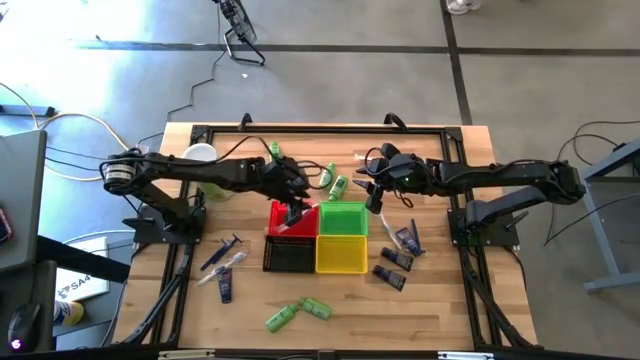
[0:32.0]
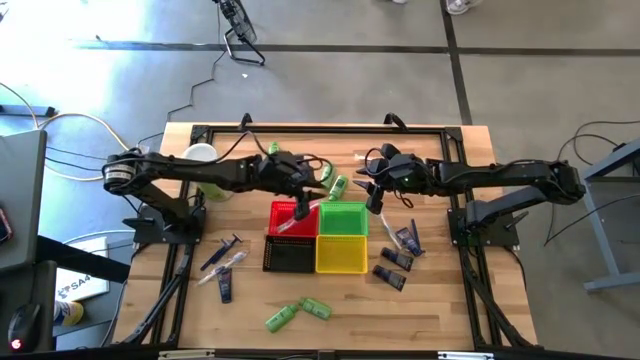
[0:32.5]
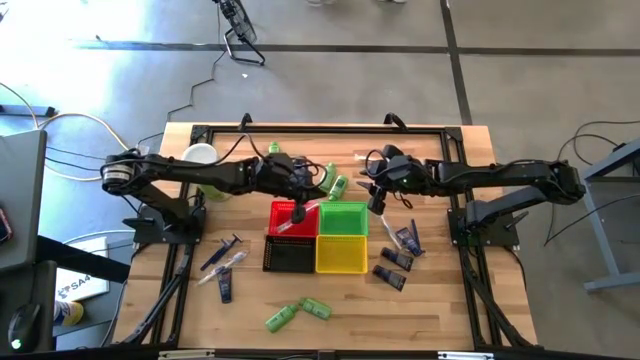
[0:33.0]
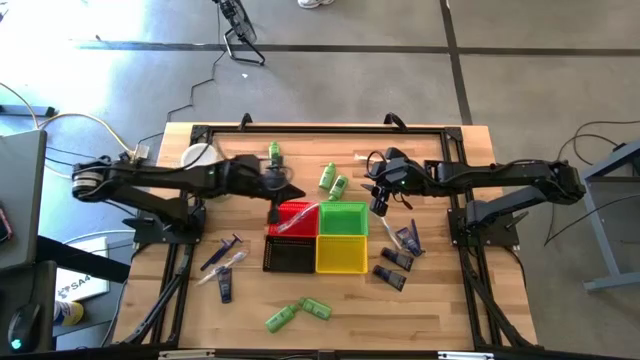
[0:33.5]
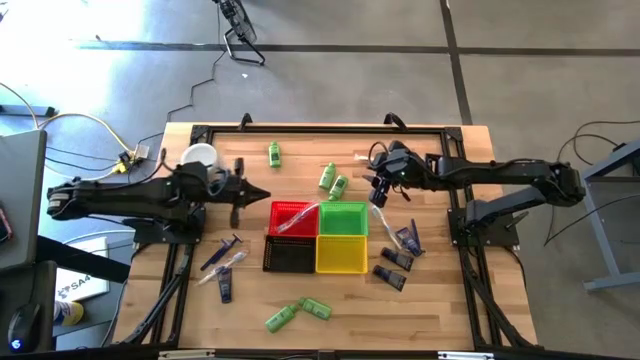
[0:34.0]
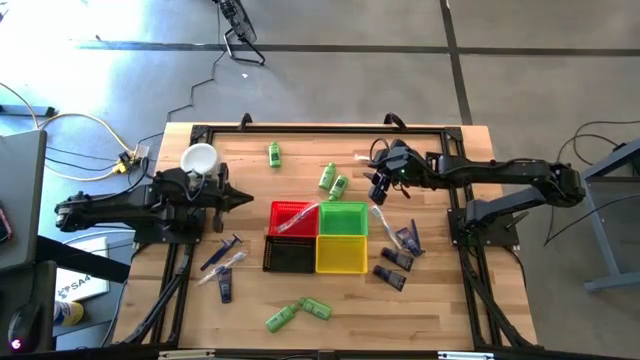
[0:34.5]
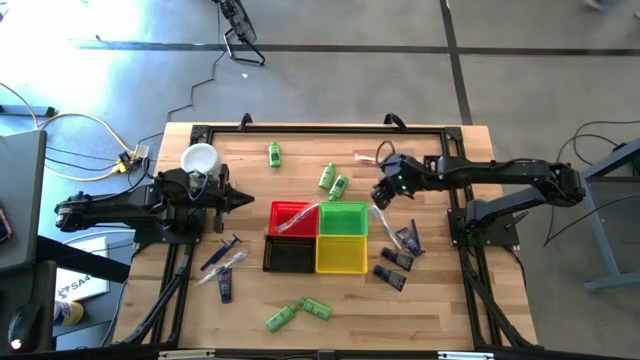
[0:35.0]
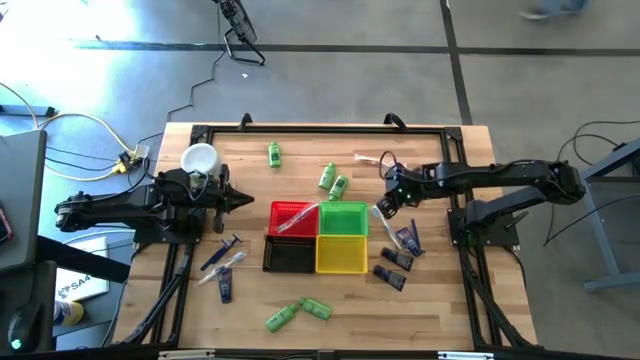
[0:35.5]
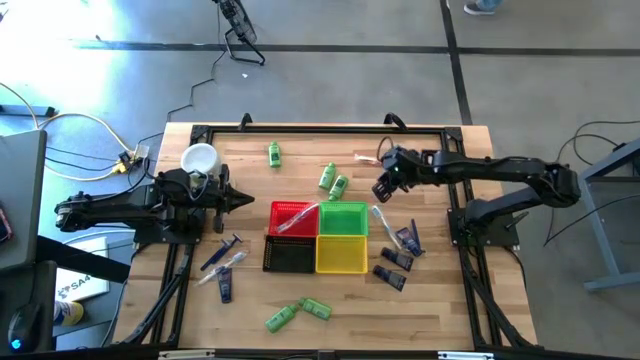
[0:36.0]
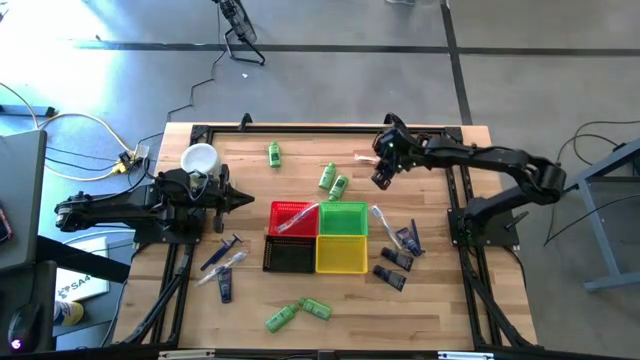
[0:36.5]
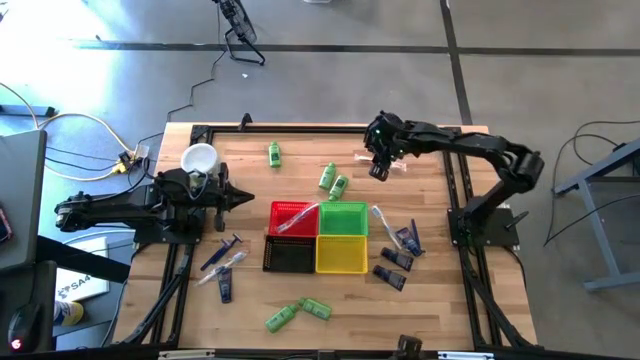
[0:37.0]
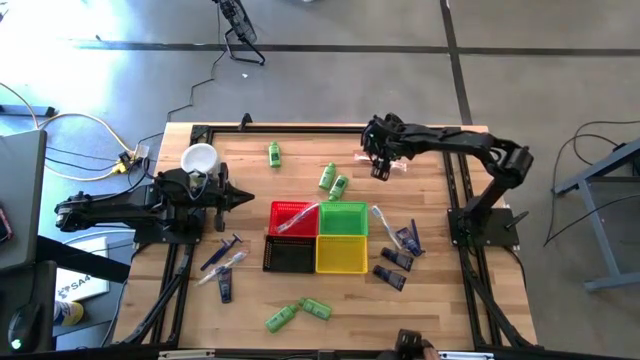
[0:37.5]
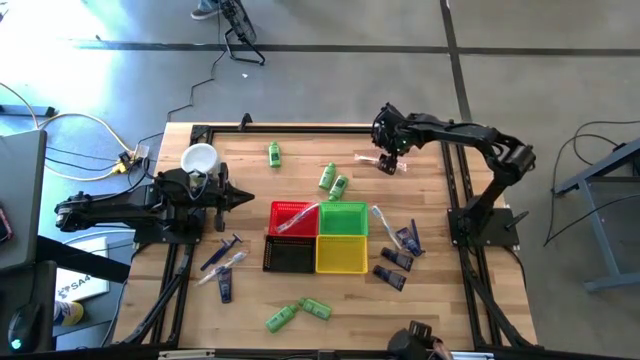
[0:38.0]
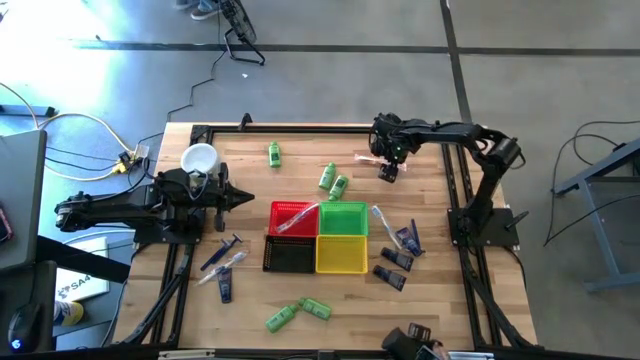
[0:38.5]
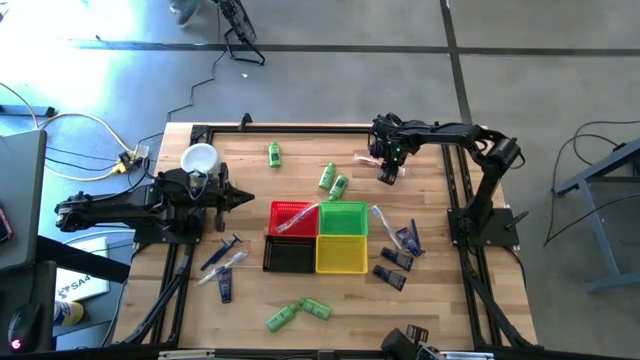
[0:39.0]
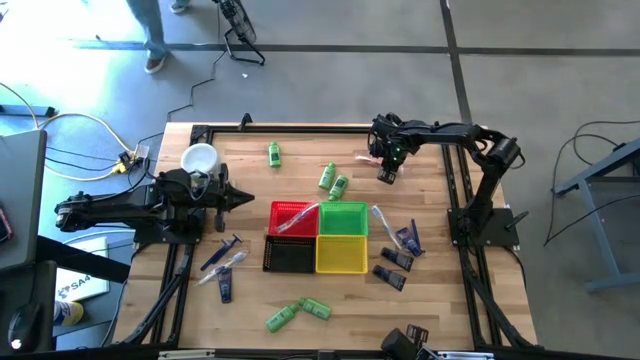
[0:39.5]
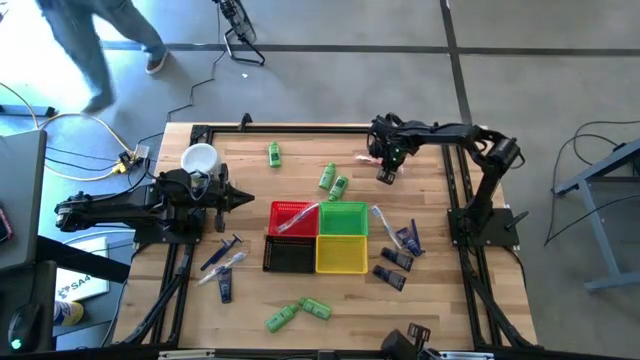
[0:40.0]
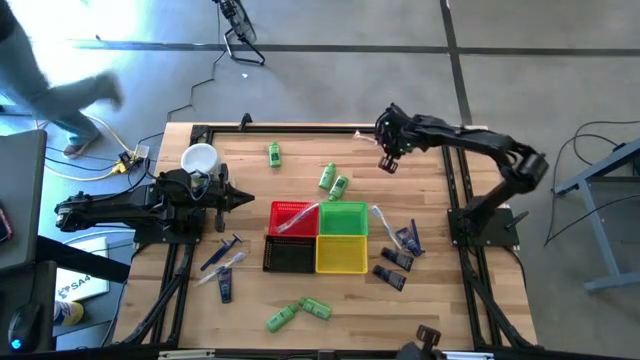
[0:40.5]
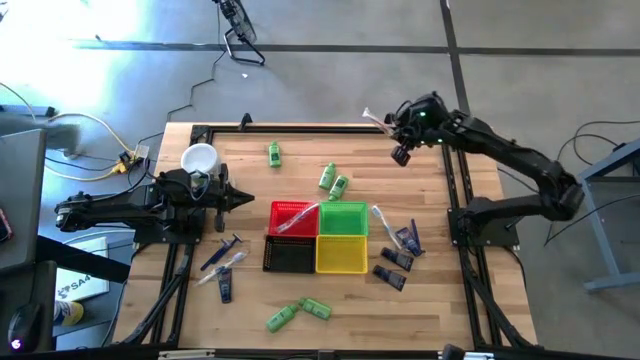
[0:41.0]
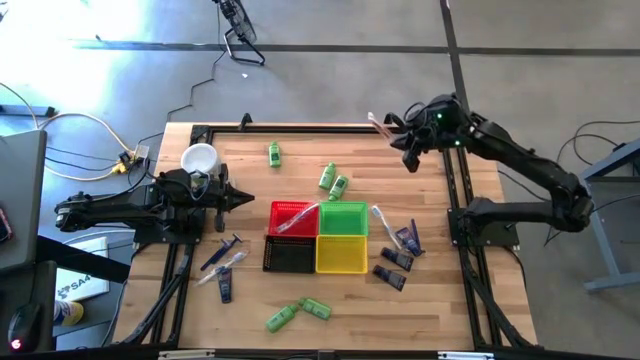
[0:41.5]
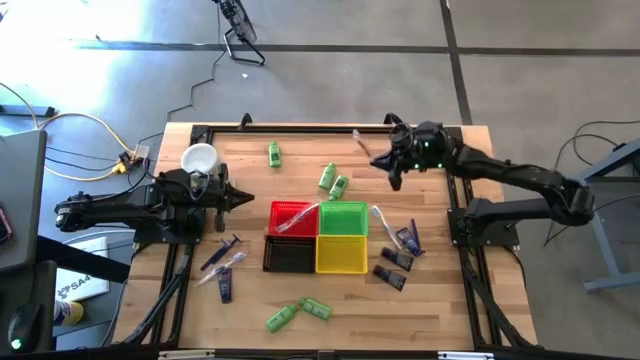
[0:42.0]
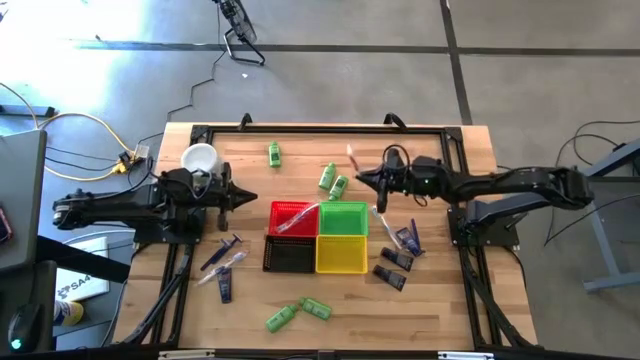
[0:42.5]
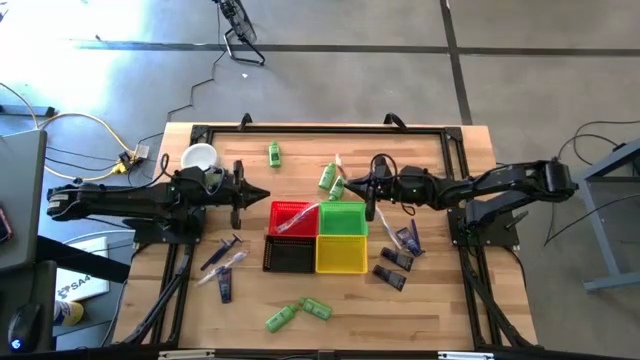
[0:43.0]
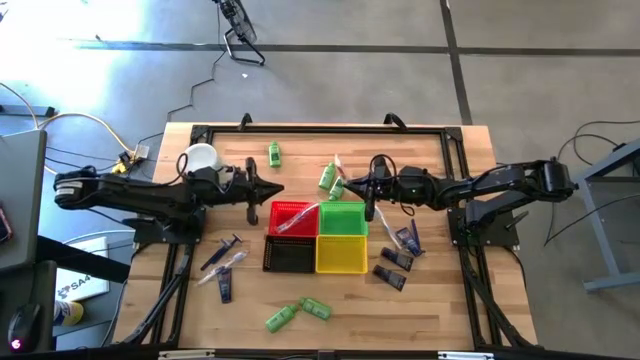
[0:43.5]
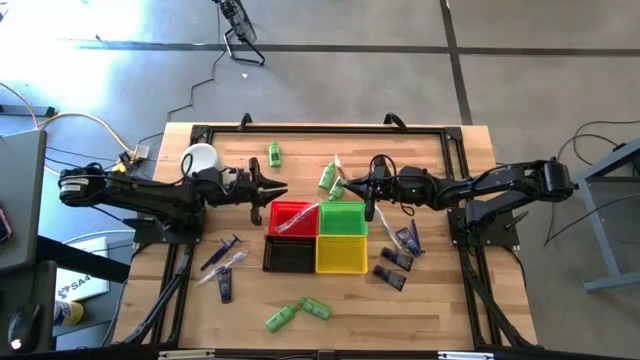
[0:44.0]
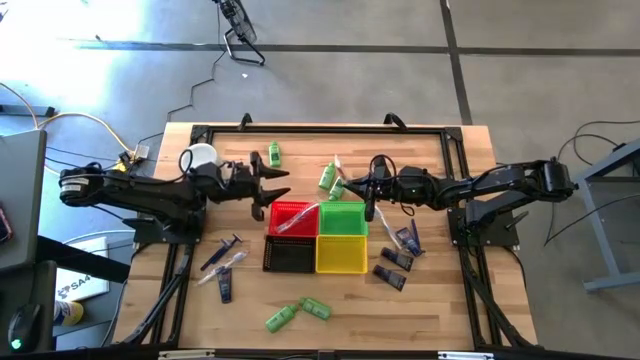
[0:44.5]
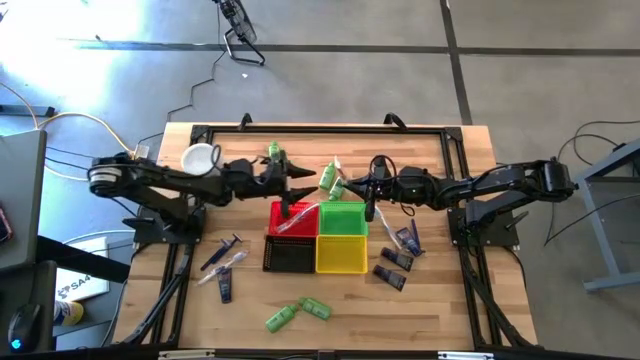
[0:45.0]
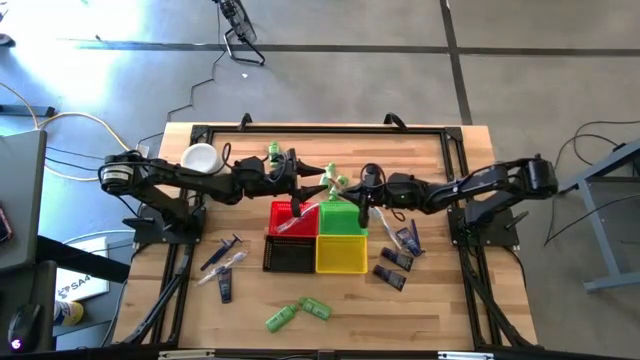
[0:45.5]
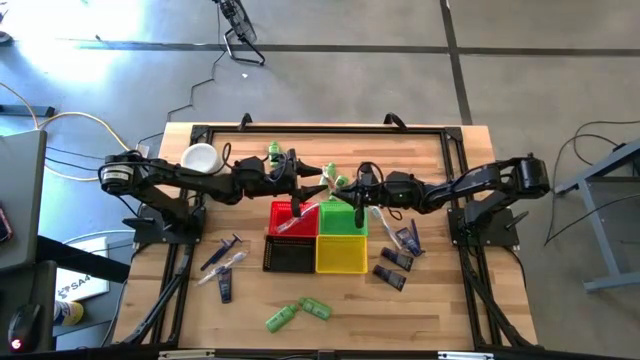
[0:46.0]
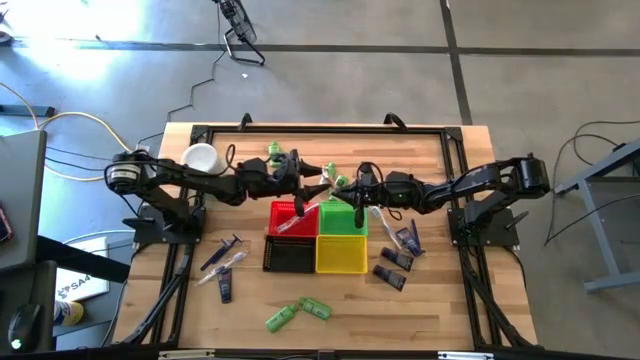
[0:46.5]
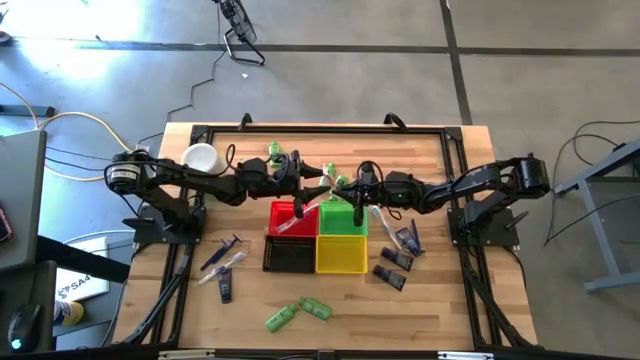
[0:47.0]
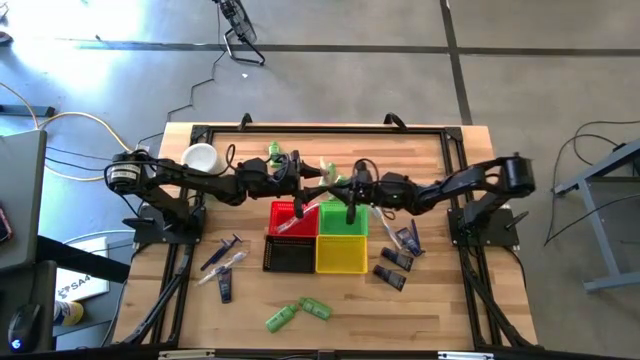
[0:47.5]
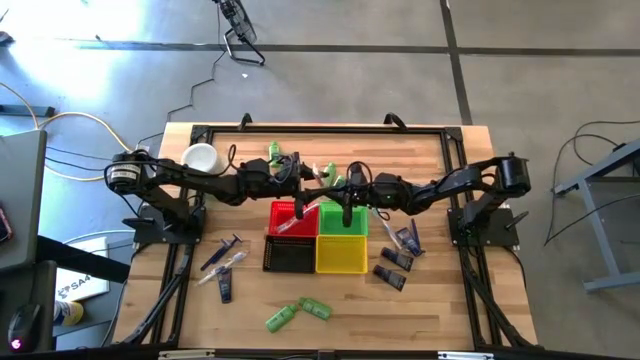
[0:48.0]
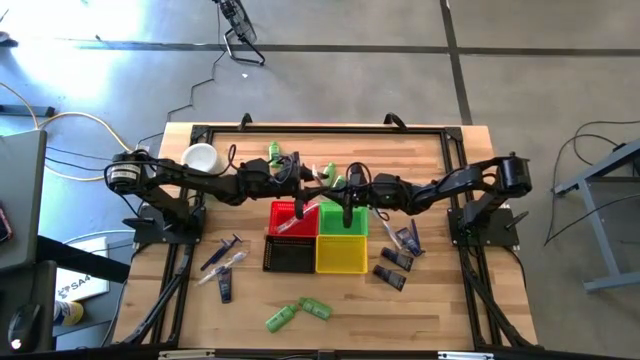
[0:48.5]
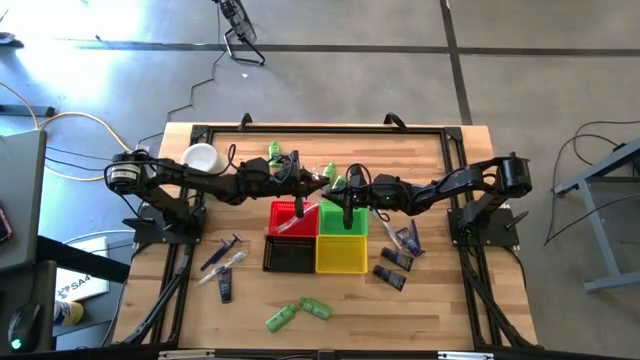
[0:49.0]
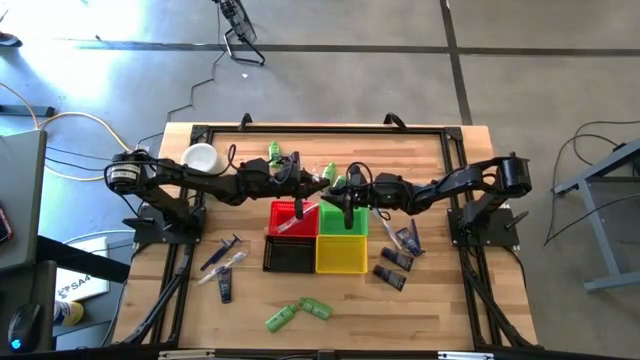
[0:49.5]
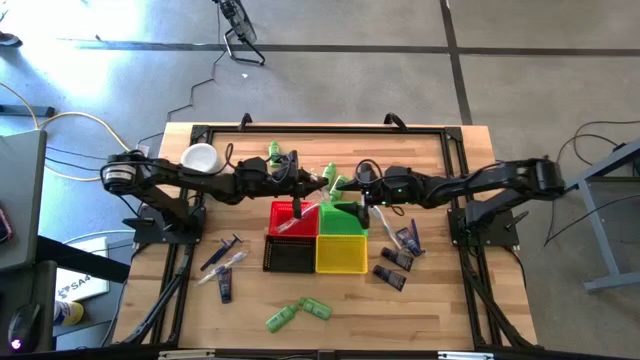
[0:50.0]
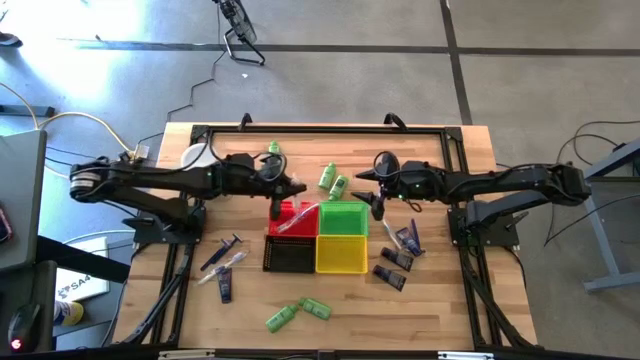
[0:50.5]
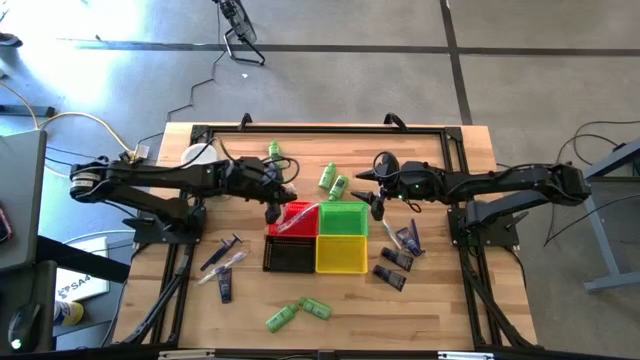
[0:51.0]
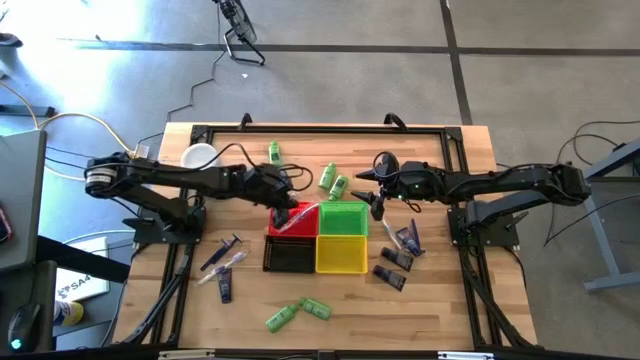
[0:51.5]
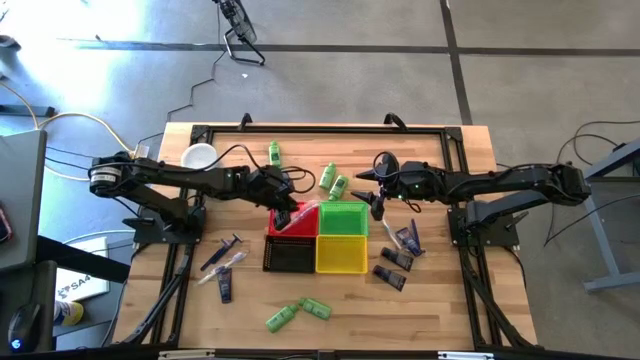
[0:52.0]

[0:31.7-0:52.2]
Task: Pick & Place Travel size toiletries
Put the orange toothbrush into the red bin
